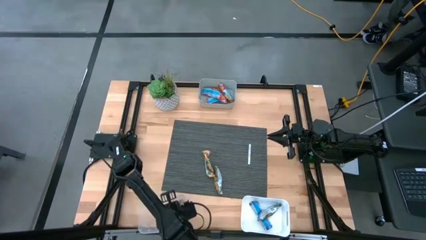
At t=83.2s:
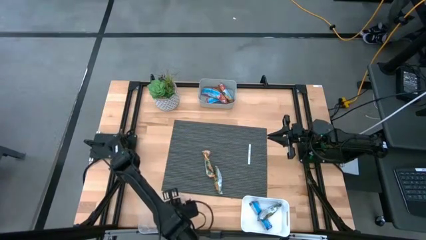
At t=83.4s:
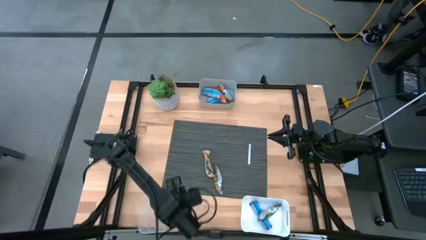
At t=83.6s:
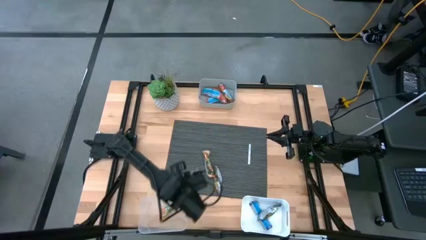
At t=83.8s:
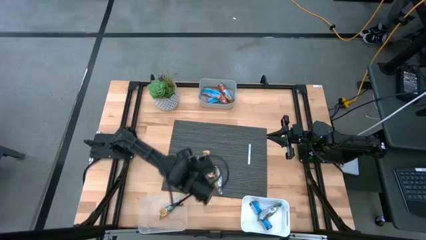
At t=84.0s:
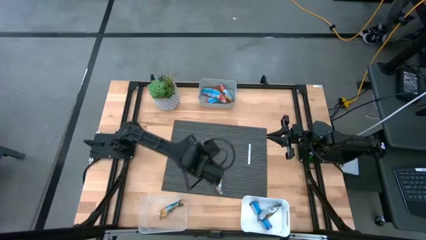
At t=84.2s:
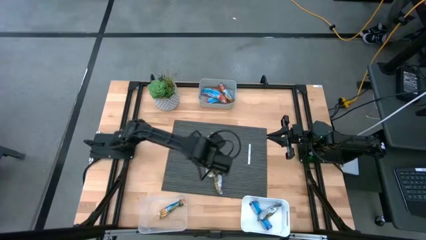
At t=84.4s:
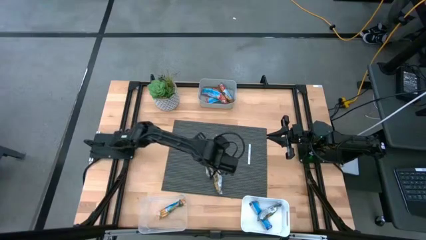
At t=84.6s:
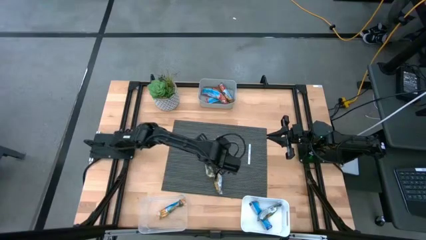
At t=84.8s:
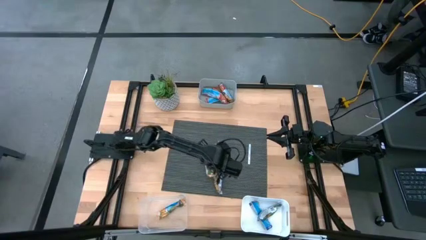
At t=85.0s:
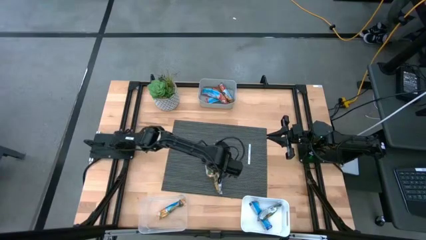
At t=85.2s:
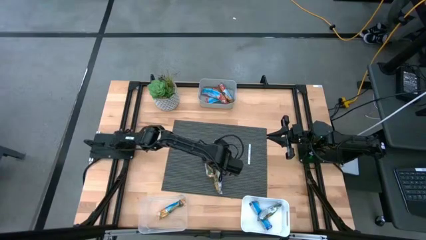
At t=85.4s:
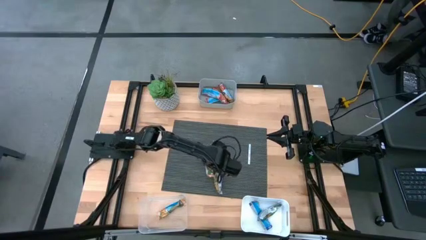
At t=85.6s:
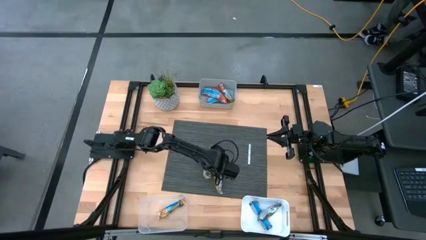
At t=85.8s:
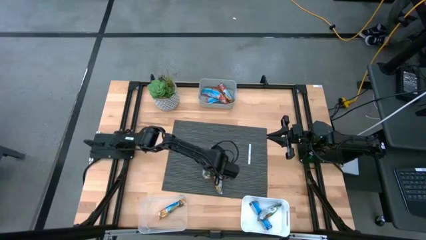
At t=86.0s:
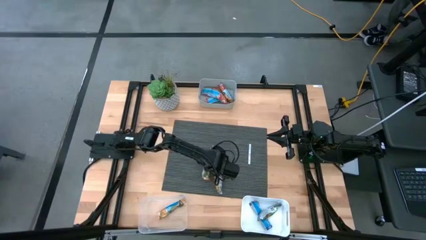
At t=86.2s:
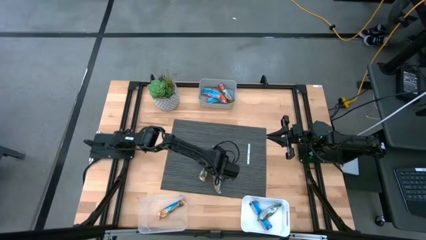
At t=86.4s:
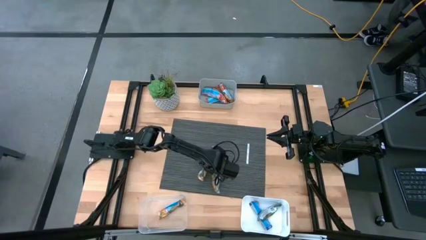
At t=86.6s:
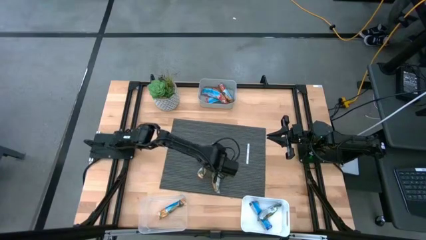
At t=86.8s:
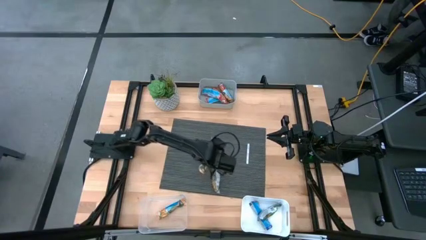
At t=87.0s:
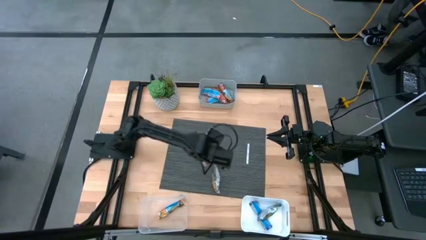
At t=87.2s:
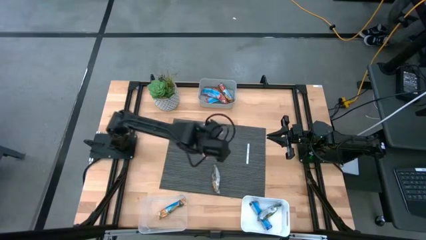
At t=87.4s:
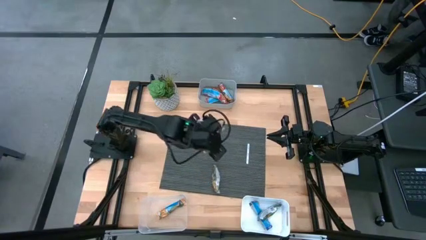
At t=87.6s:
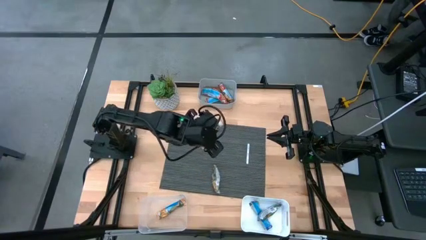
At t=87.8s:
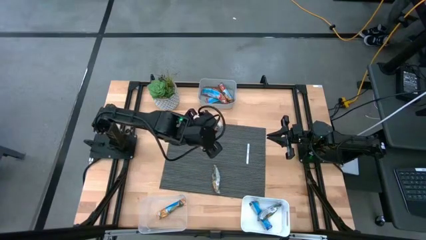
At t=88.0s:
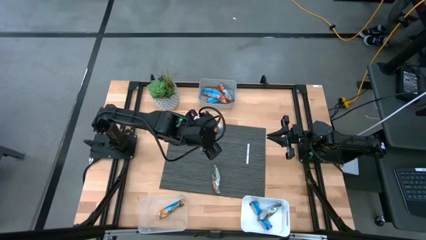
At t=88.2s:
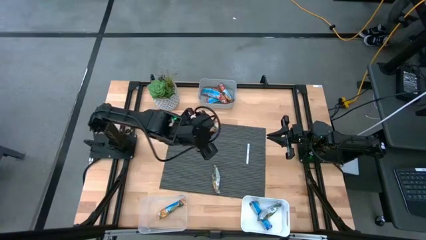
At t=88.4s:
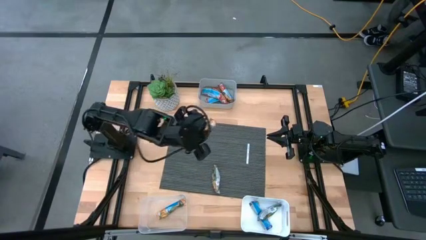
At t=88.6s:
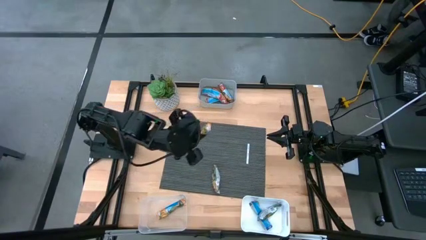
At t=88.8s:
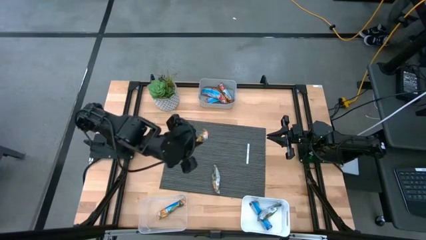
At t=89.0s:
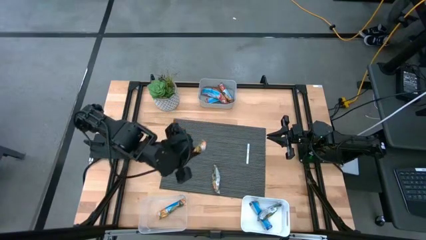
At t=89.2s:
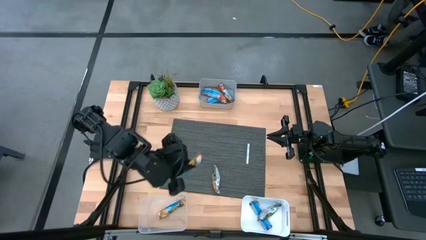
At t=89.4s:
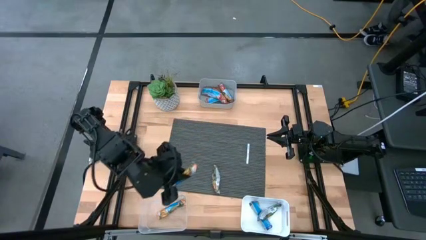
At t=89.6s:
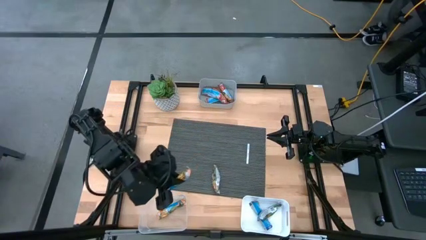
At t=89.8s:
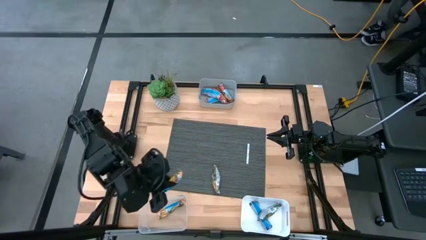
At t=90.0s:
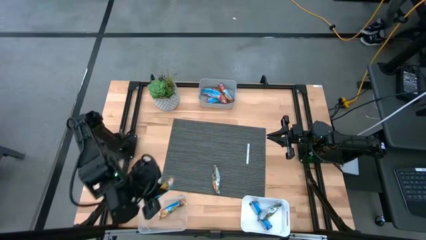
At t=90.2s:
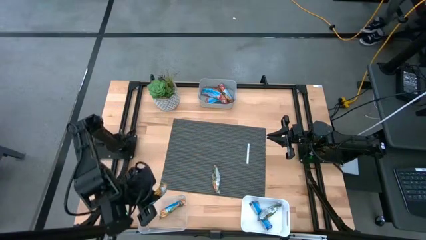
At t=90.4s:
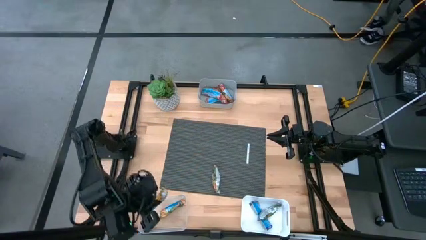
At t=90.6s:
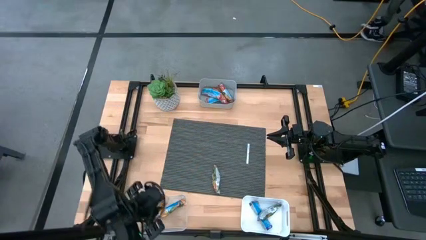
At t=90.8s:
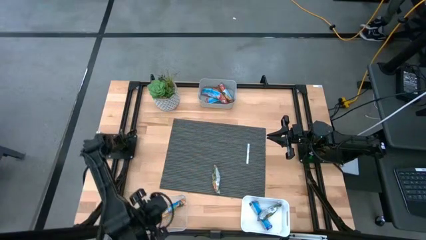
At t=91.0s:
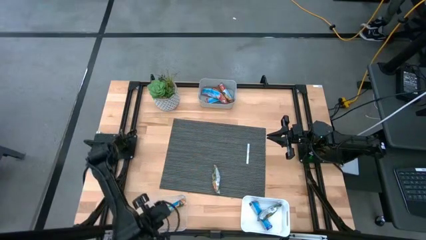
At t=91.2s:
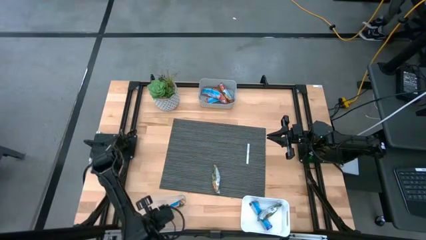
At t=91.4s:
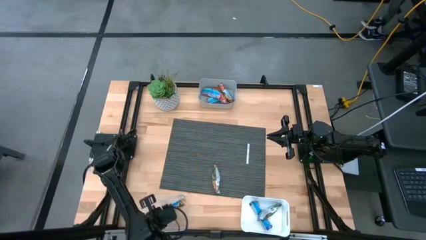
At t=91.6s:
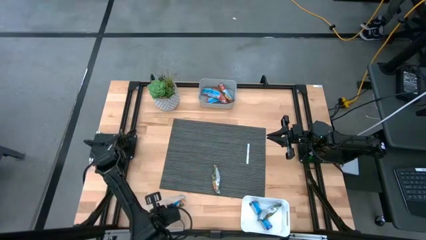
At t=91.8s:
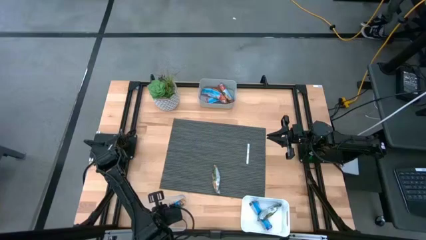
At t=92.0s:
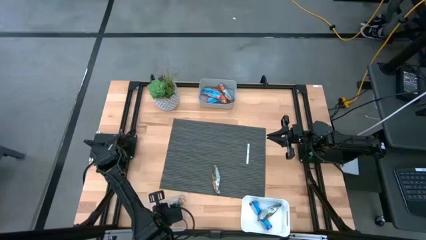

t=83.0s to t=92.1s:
Task: Pick and place Granola Bars by type
Put the yellow granola bar into the transparent bin

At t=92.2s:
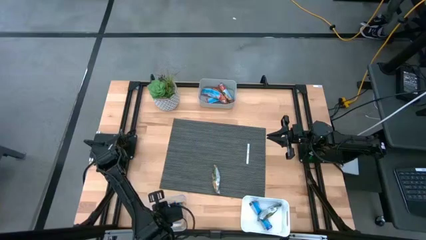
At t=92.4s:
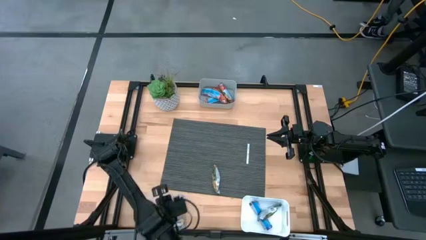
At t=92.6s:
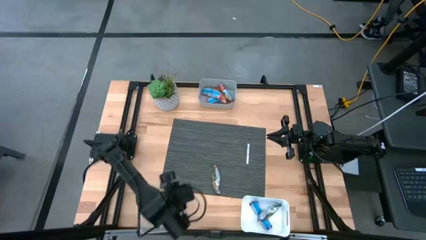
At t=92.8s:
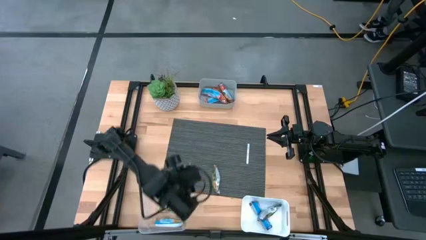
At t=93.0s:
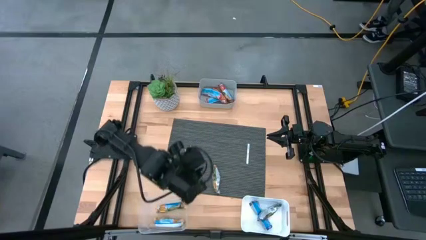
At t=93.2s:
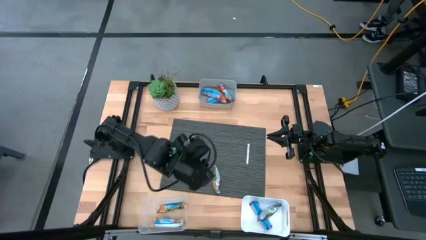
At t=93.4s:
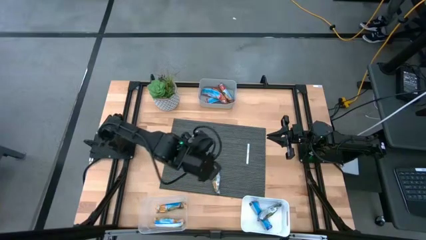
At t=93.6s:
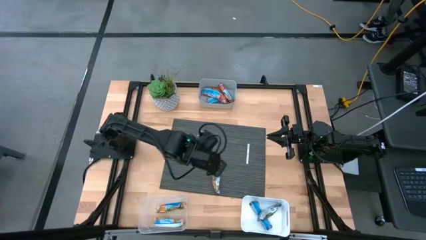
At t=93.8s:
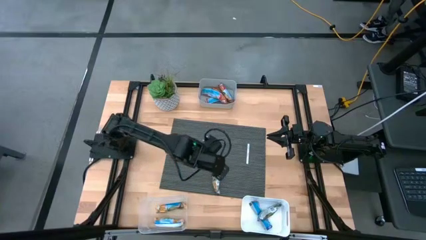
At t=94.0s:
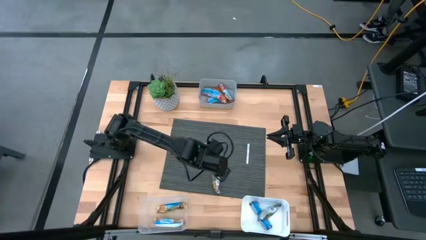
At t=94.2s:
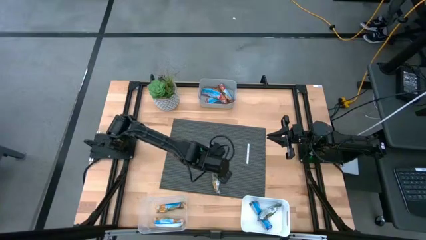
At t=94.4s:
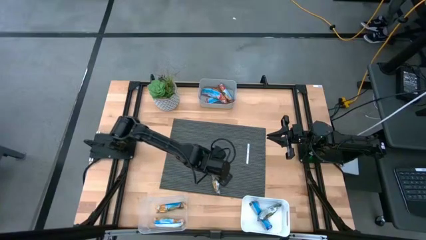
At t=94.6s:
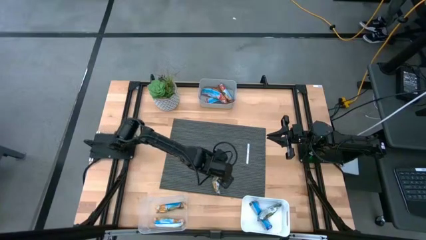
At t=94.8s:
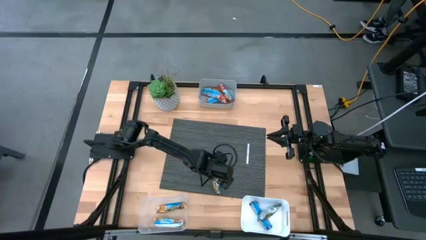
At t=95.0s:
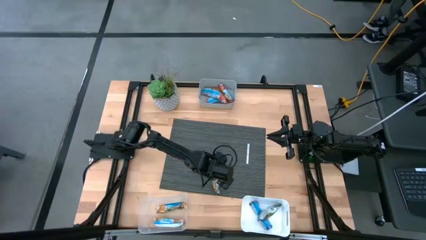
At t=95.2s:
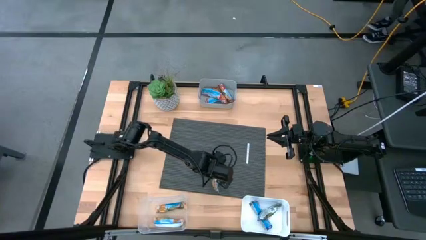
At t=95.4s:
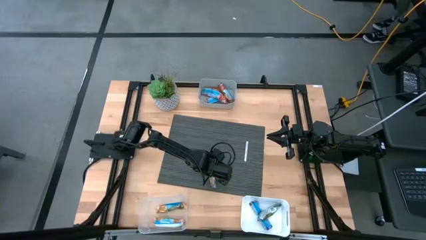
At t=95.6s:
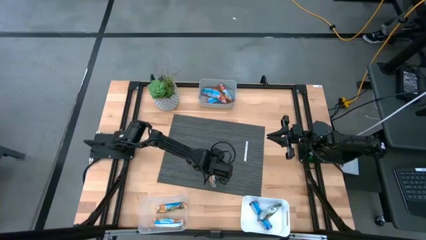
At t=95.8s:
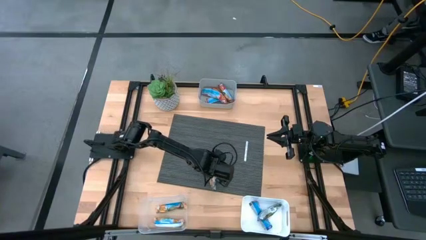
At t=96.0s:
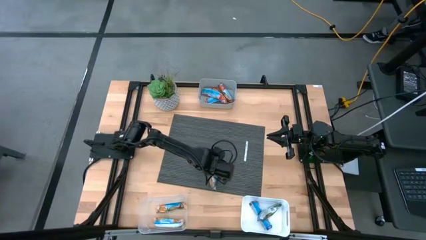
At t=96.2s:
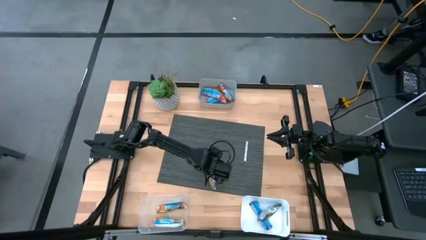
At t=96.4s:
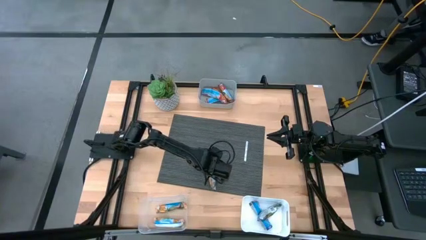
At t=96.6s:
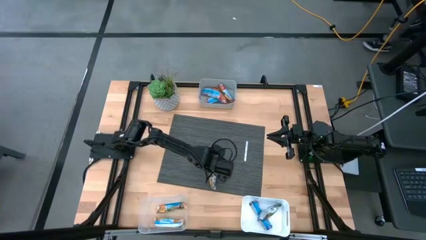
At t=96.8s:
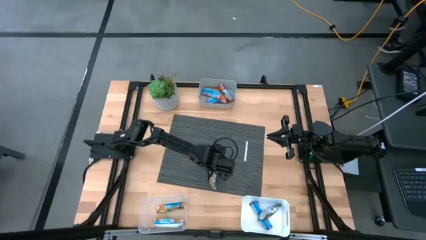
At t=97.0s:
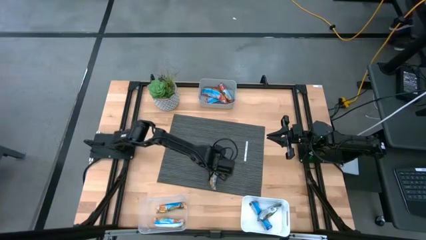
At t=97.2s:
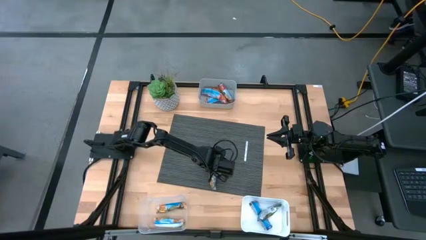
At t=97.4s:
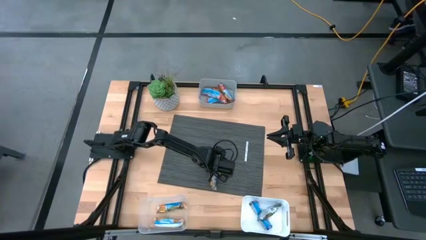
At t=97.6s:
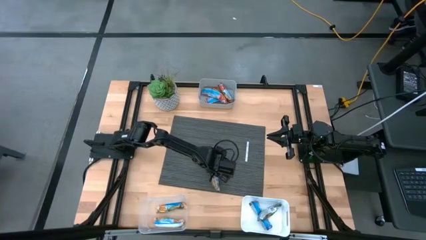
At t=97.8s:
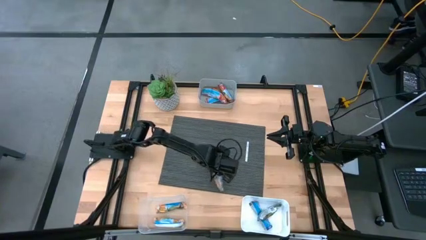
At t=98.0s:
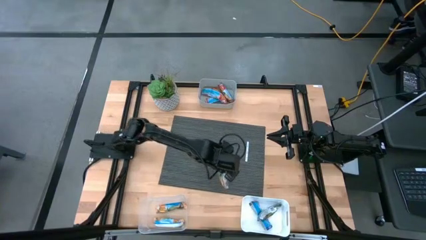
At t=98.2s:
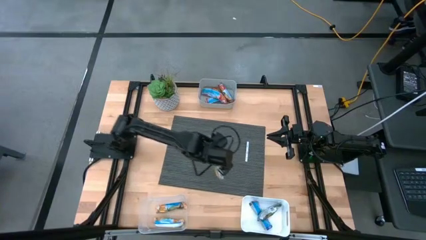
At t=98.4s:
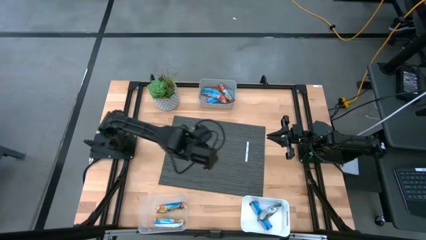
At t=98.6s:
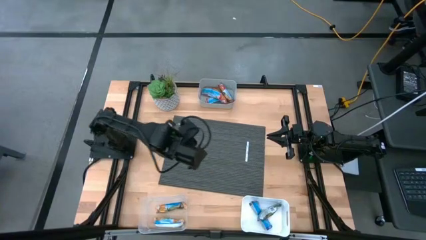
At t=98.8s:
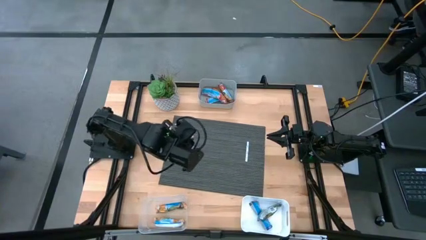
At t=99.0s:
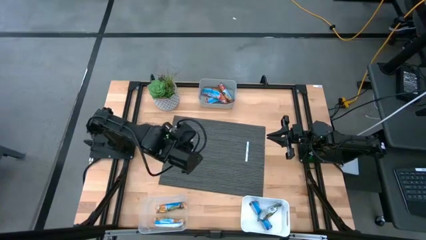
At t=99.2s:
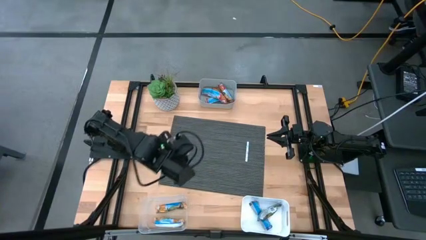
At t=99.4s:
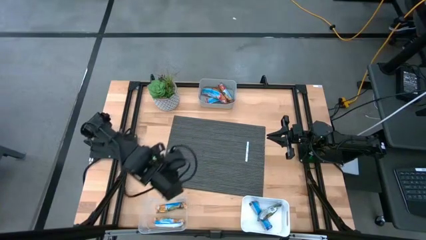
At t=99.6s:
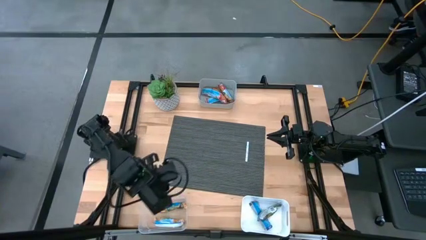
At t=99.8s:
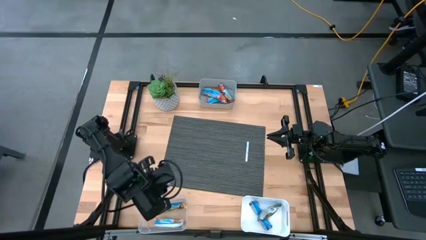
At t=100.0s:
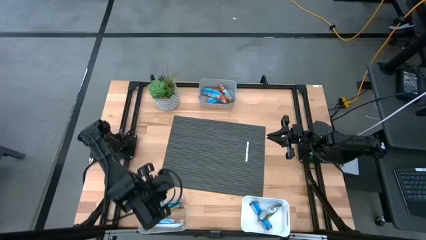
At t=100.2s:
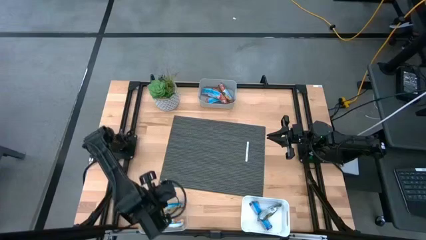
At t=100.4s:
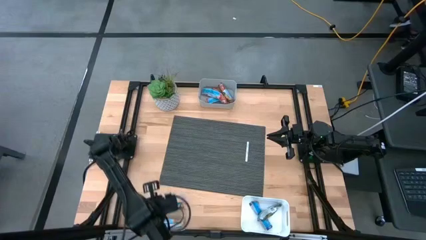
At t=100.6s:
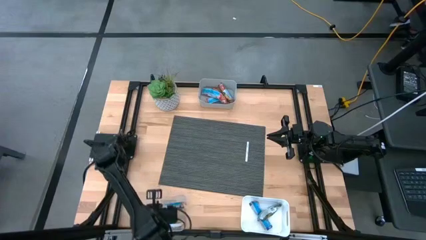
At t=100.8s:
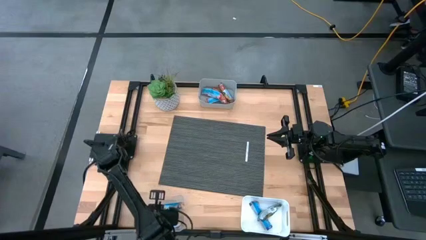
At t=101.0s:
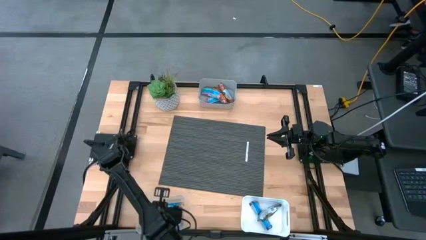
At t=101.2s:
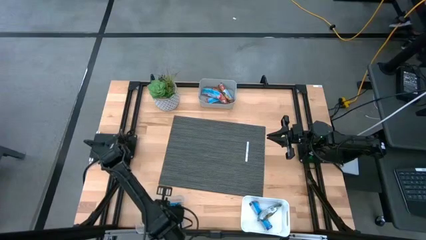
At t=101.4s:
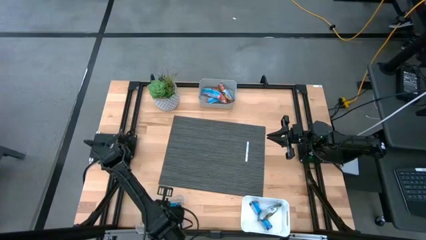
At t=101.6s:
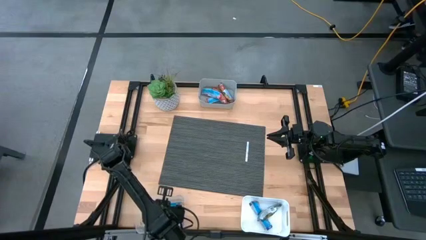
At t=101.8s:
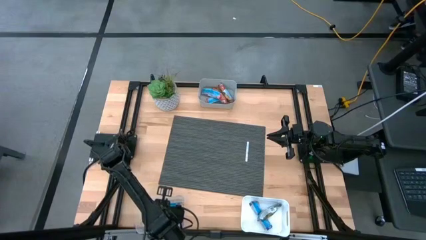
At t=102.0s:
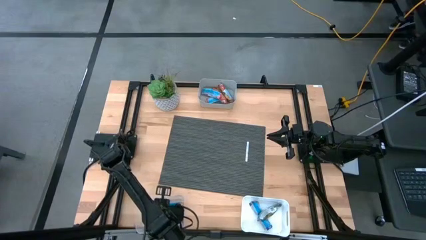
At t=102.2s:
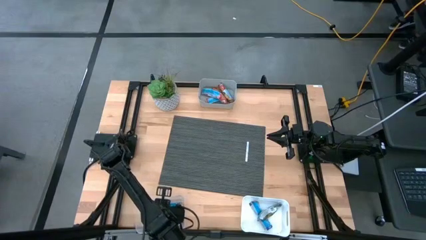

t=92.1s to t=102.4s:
Put the yellow granola bar into the transparent bin
